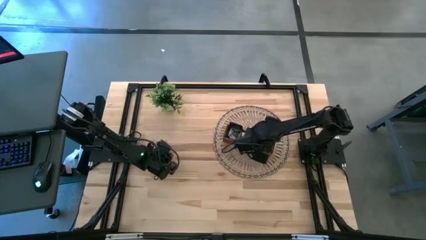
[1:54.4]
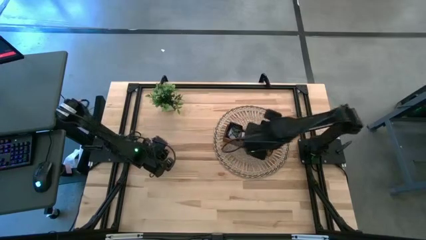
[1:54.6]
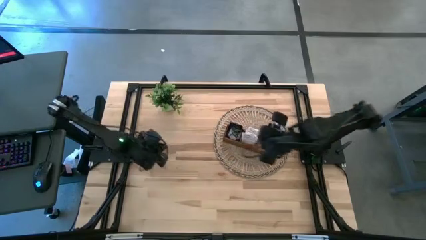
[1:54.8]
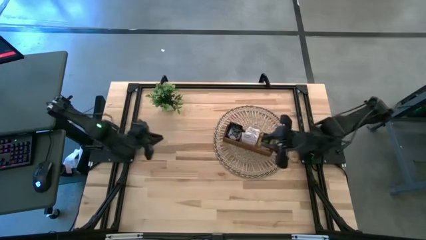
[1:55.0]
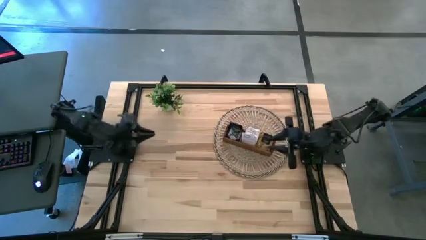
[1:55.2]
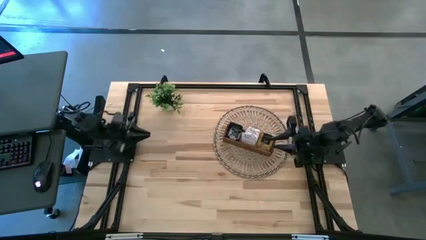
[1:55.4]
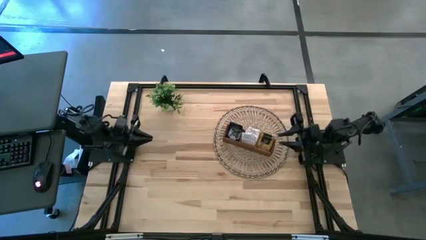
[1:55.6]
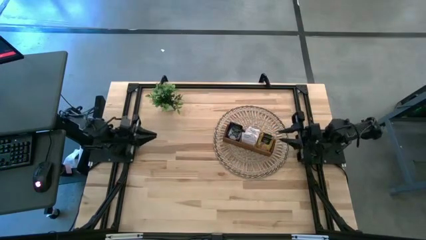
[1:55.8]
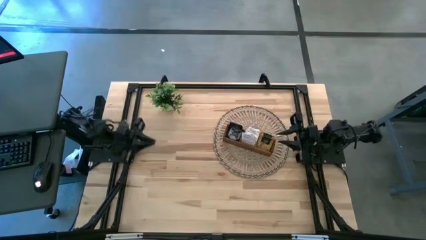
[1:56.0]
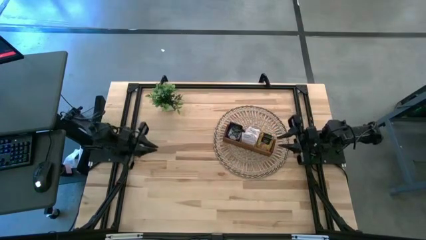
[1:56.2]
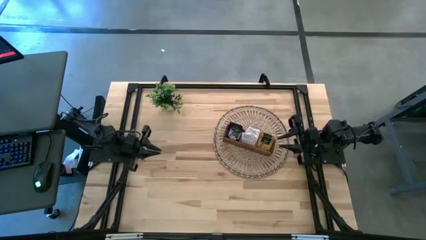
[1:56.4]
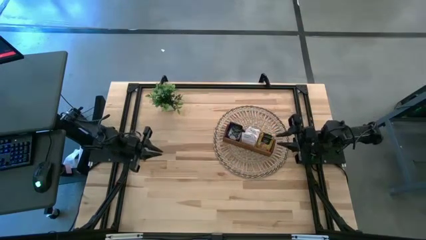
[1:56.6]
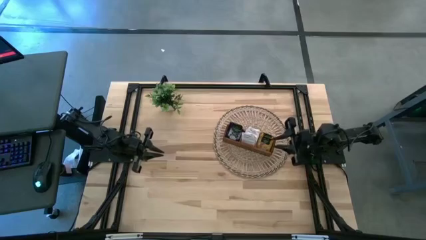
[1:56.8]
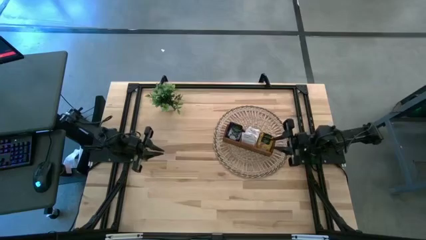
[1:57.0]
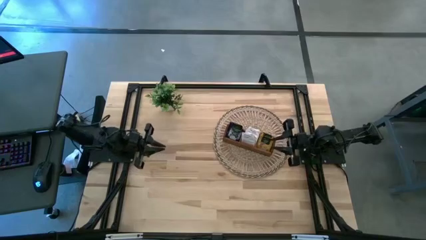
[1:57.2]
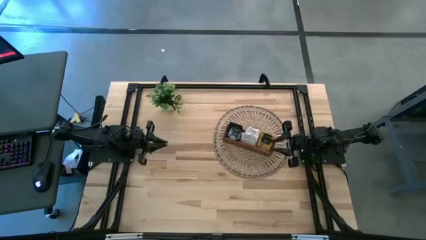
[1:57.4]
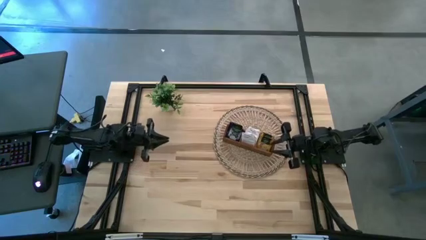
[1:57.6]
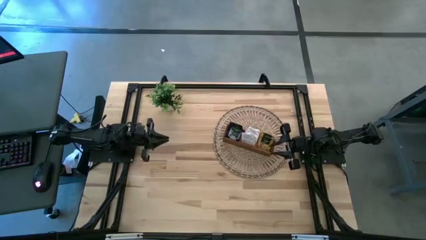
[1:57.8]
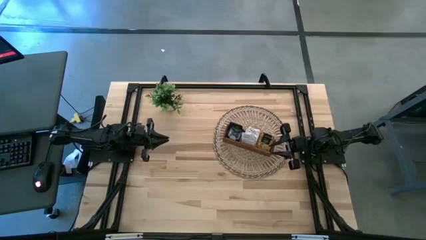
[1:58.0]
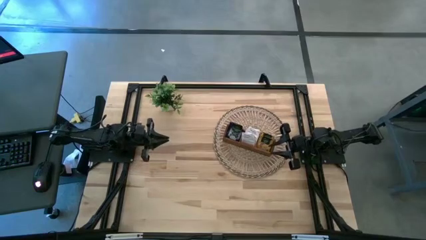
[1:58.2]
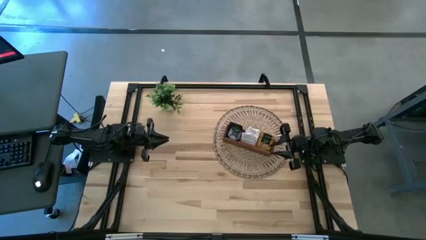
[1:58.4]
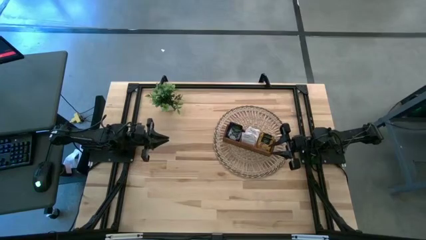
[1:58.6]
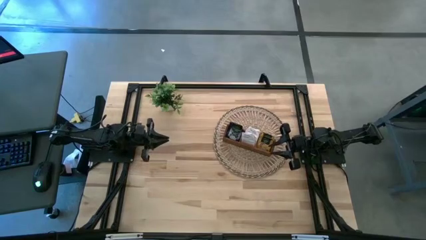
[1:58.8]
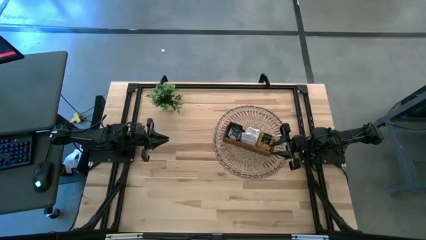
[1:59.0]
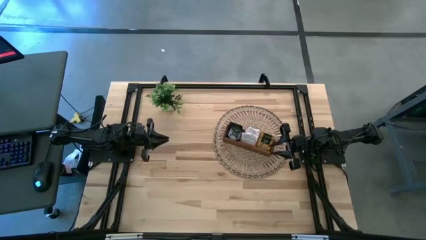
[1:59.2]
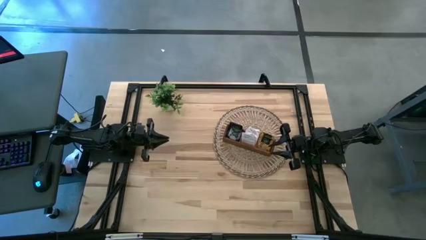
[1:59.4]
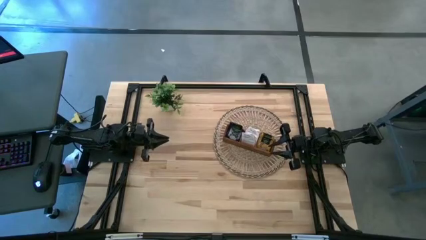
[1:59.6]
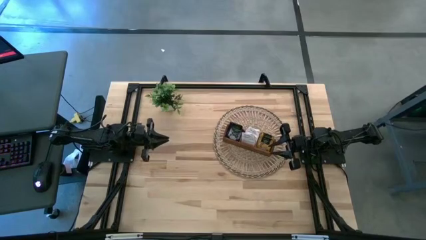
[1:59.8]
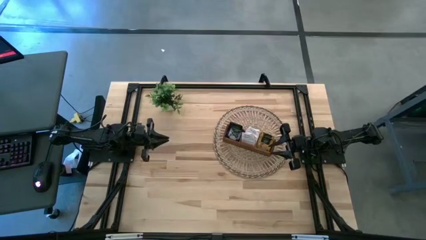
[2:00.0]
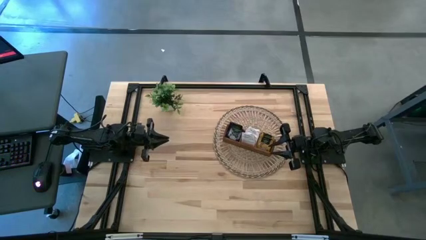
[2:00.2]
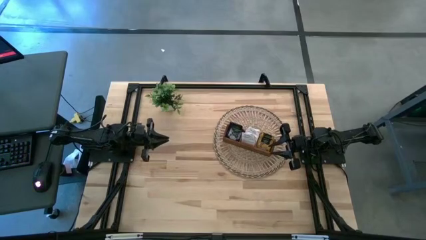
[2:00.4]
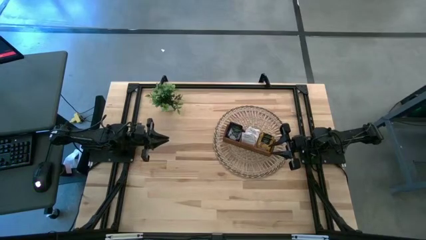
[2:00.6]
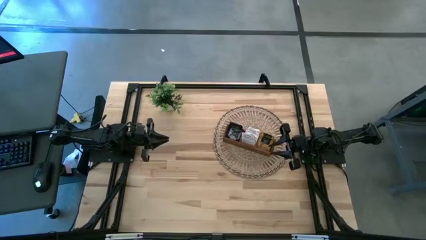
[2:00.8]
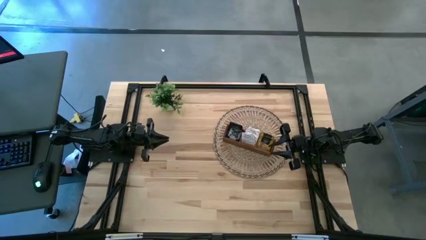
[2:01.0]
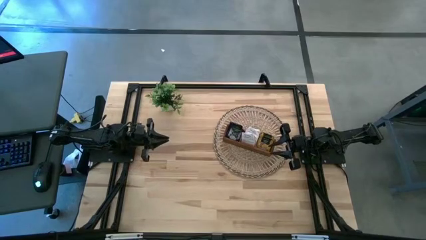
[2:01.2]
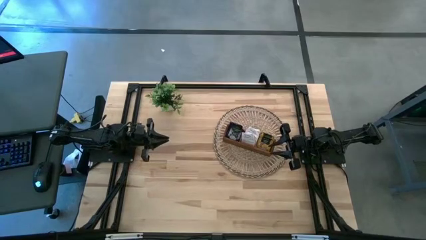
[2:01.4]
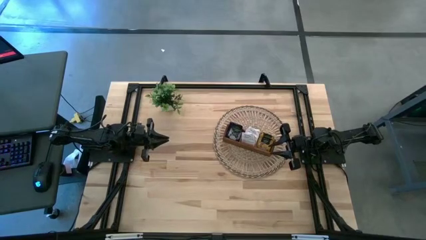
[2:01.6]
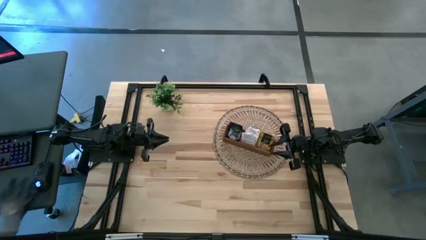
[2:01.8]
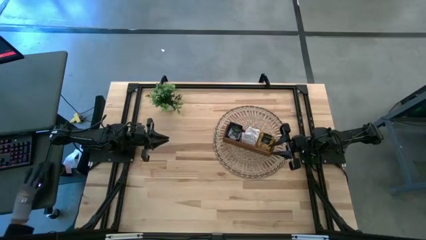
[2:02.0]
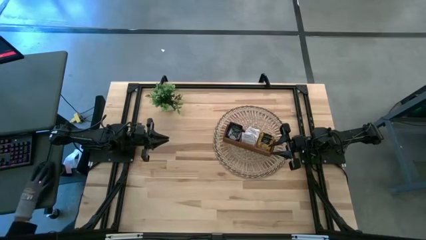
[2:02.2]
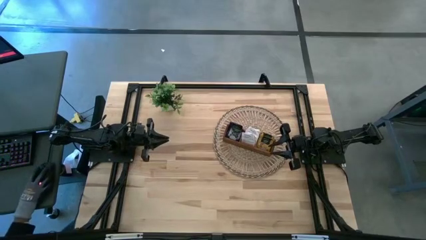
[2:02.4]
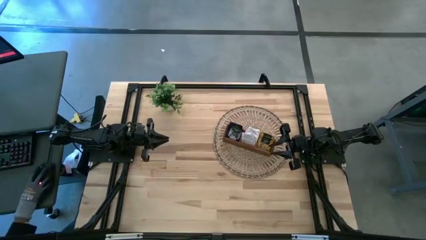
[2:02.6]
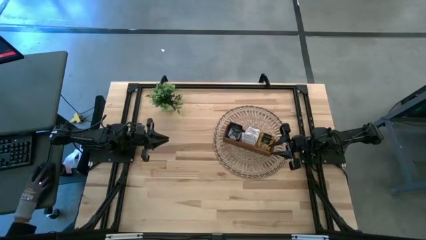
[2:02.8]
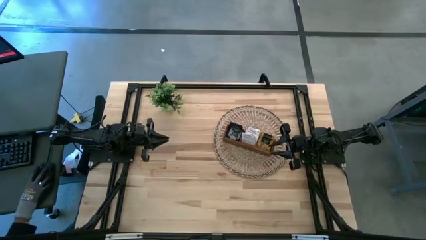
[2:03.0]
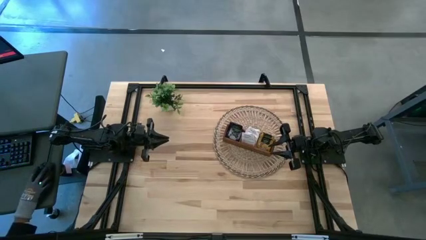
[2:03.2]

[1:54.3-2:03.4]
Task: Pick & Place Tea
Return to Home Position

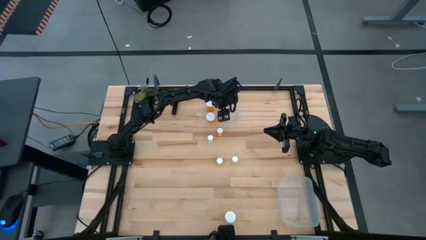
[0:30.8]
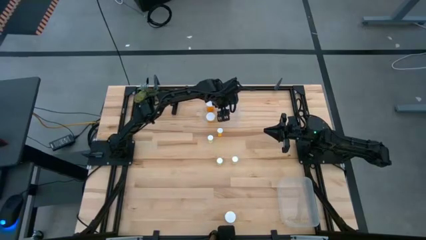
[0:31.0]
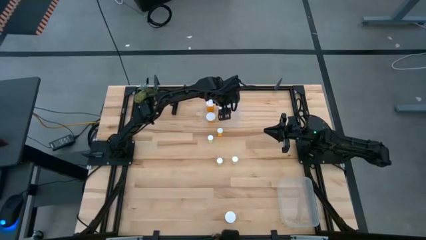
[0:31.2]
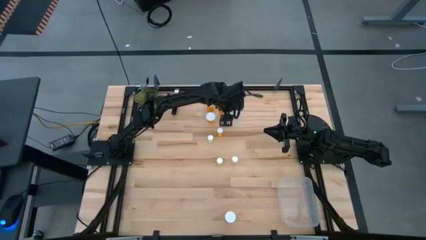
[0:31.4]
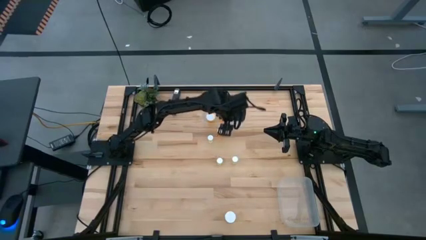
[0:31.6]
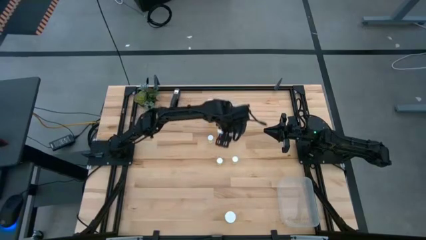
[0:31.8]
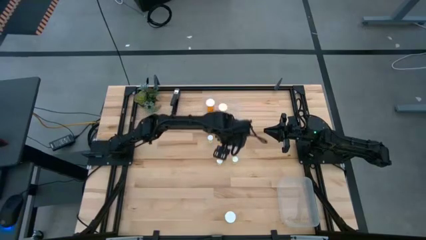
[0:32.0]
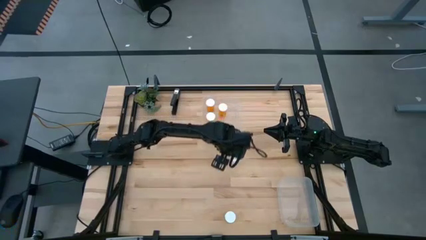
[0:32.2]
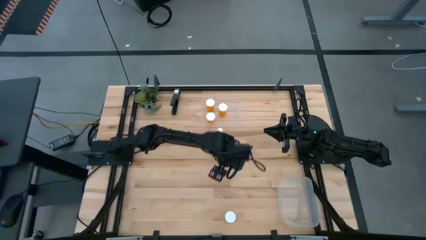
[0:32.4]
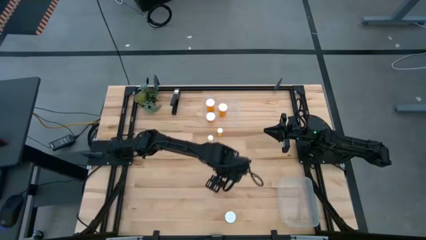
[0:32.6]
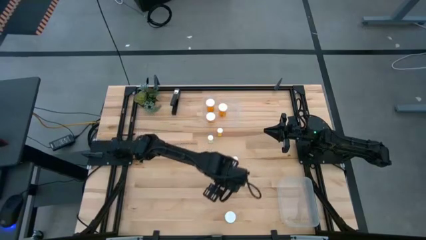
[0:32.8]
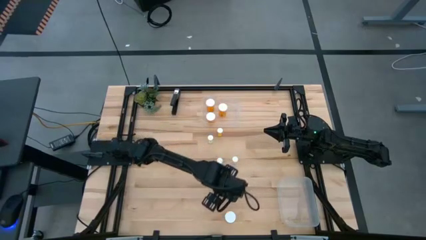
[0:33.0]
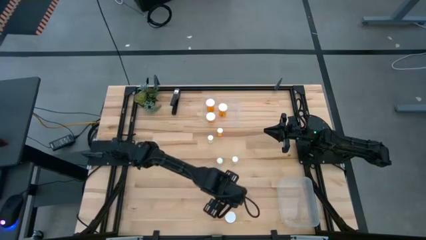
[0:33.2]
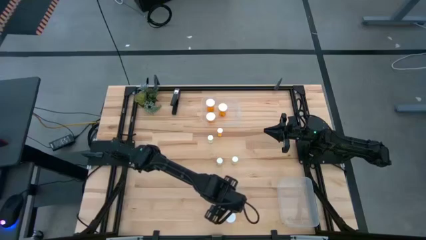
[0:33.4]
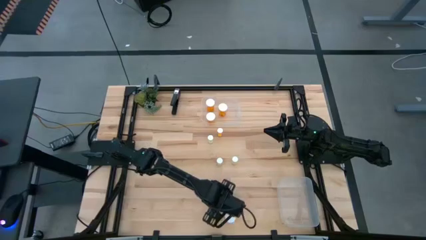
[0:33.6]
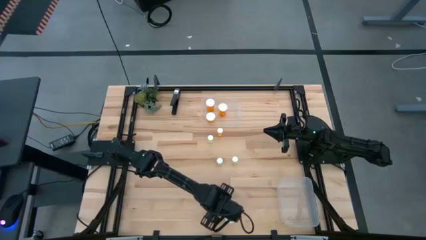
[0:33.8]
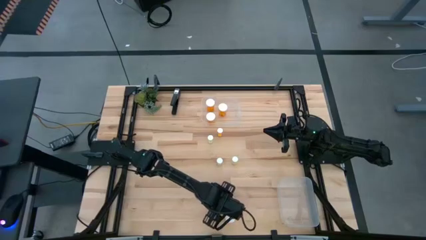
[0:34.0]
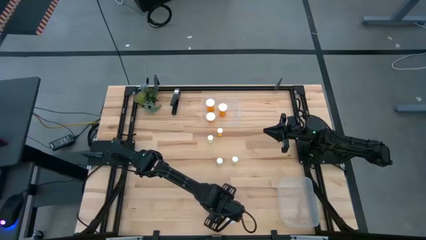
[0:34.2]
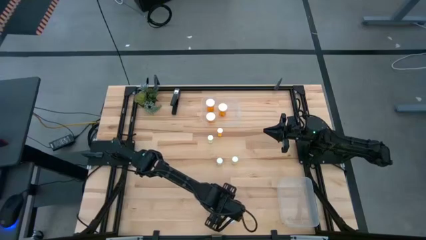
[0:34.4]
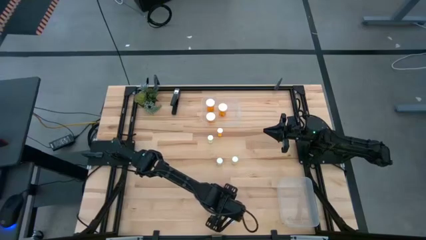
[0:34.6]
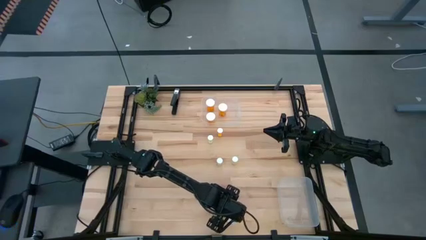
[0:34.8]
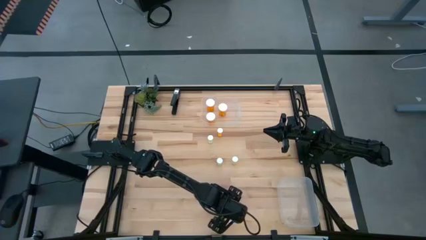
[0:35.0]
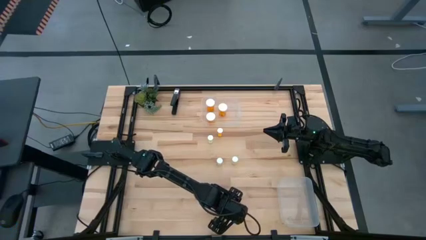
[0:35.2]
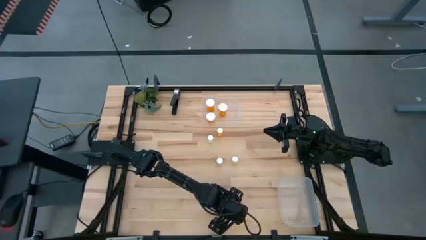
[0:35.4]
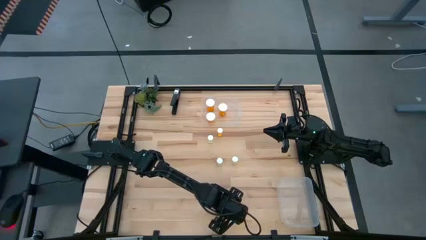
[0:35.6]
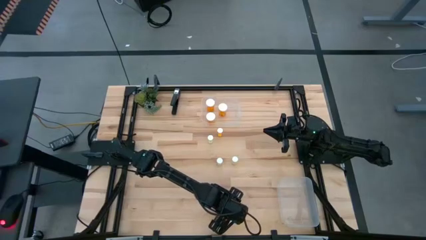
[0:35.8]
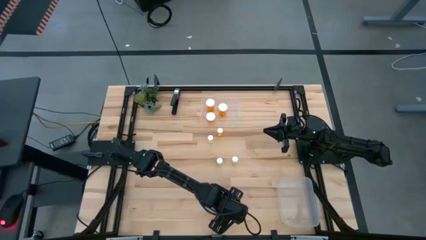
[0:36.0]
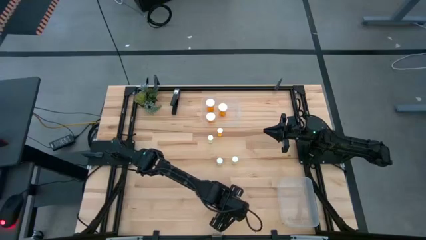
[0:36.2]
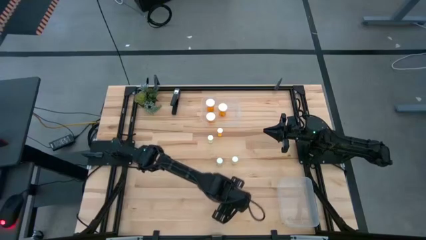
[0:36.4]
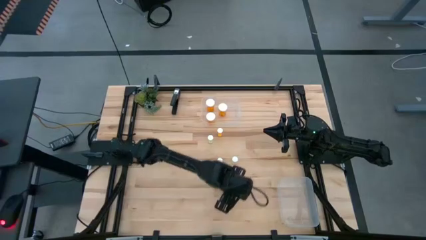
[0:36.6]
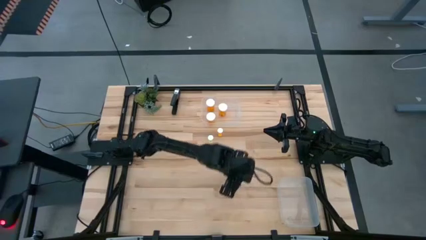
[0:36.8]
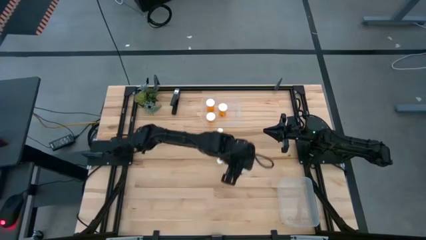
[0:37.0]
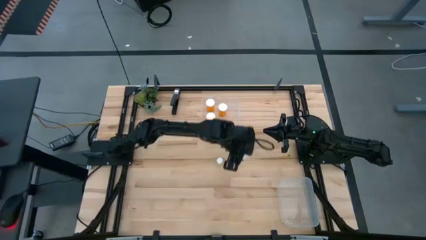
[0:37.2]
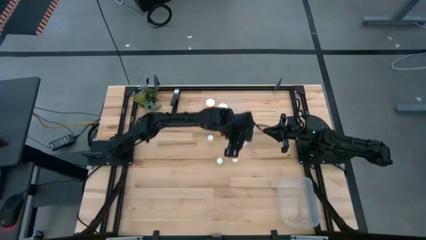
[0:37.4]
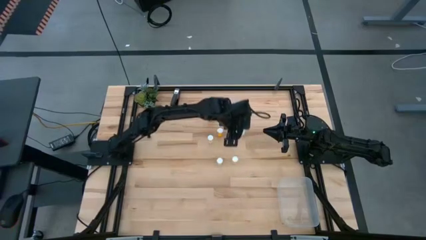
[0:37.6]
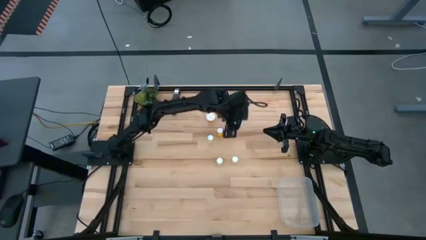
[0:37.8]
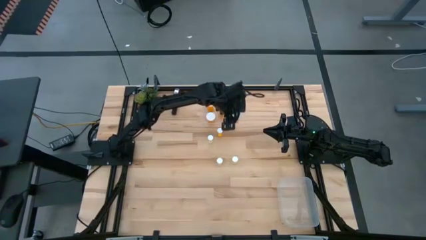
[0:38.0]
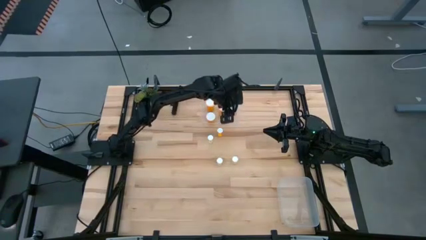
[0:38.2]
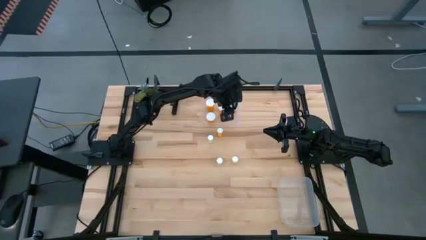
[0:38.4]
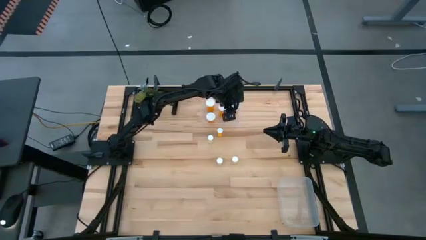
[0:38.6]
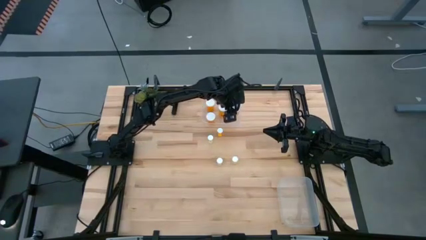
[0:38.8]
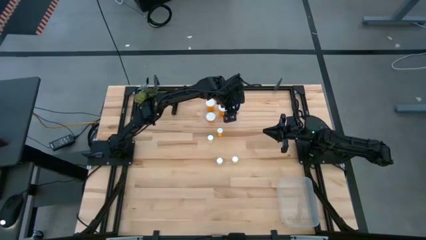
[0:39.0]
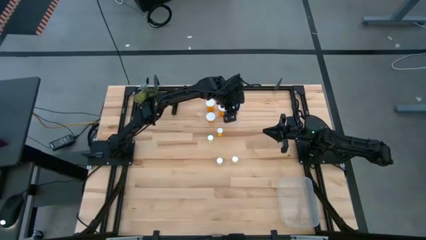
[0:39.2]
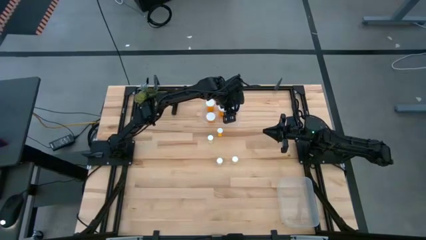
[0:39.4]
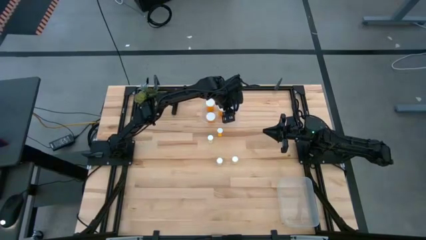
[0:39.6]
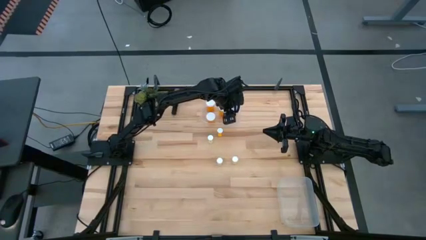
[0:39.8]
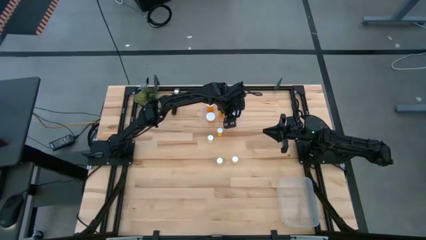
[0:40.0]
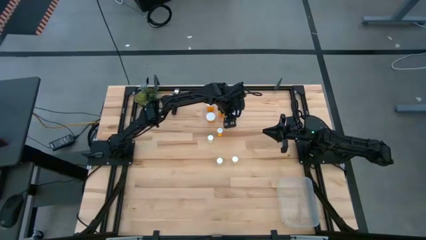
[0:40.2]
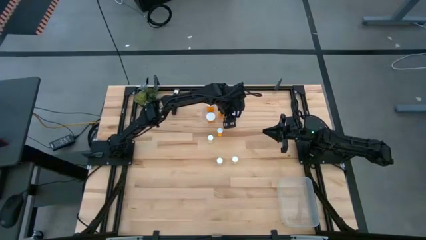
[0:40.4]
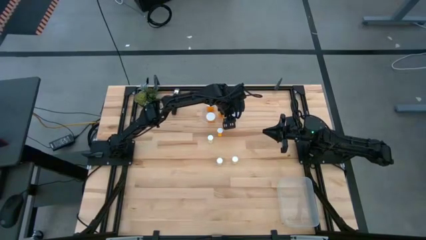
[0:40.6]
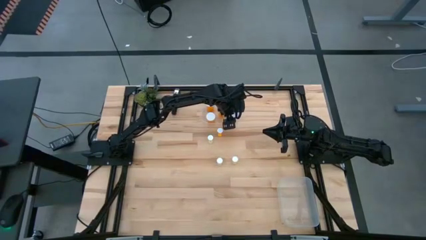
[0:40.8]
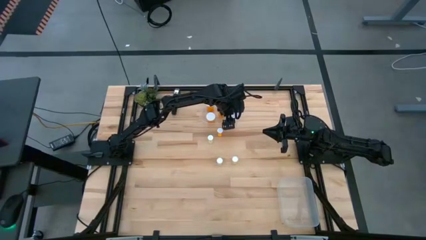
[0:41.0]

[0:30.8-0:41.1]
Task: Pick and place medicine bottles into bin by pill shape (circle, oval)
Put the orange capsule bottle into the top transparent bin
